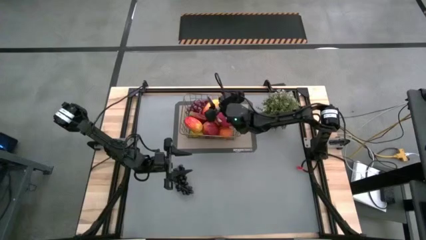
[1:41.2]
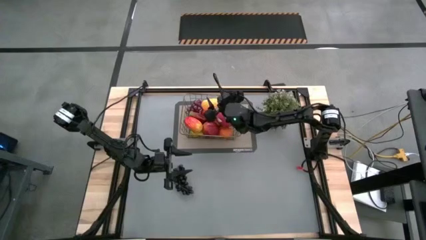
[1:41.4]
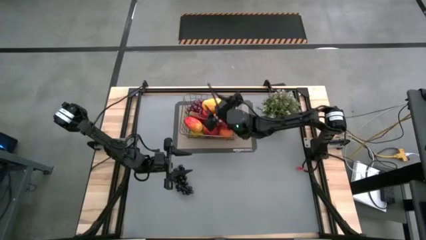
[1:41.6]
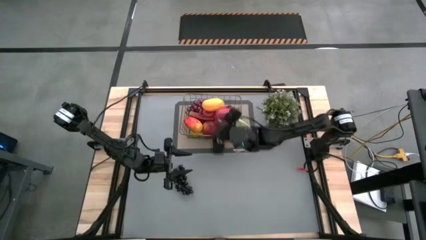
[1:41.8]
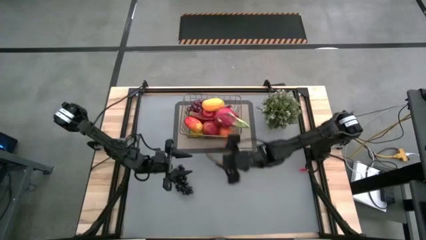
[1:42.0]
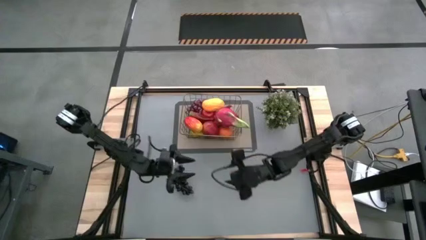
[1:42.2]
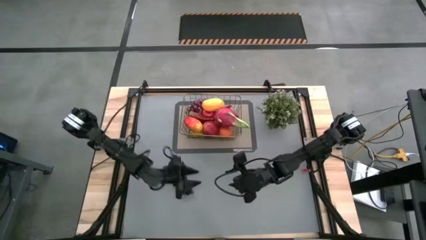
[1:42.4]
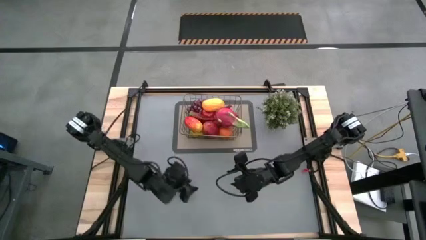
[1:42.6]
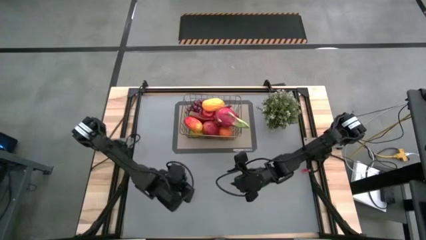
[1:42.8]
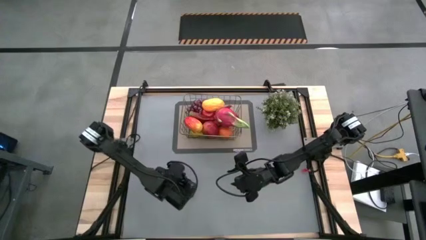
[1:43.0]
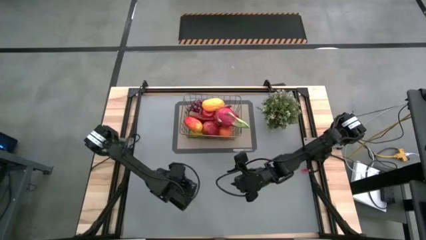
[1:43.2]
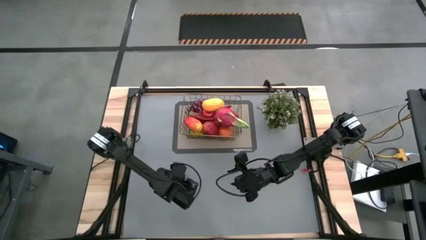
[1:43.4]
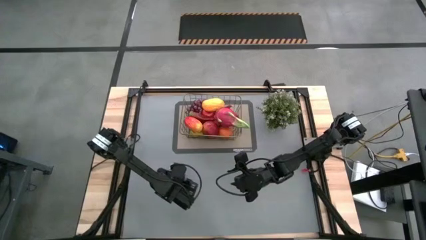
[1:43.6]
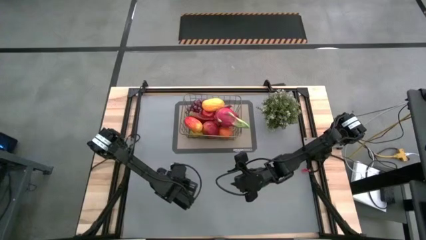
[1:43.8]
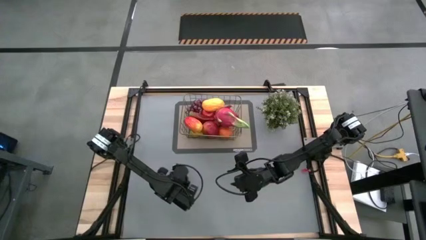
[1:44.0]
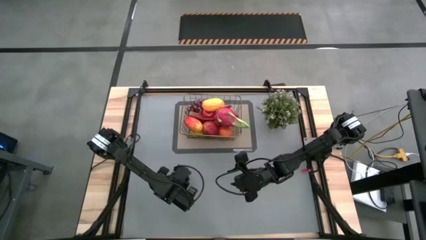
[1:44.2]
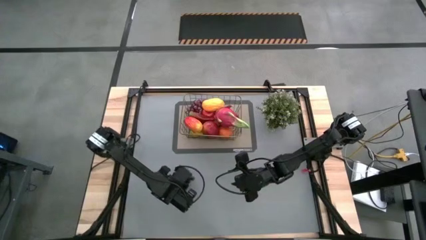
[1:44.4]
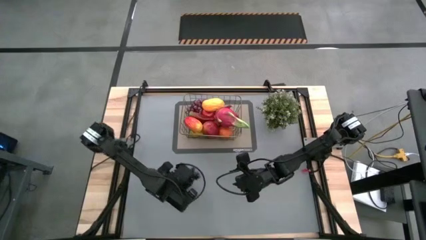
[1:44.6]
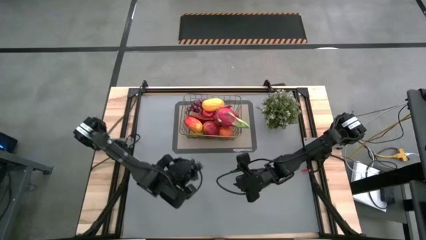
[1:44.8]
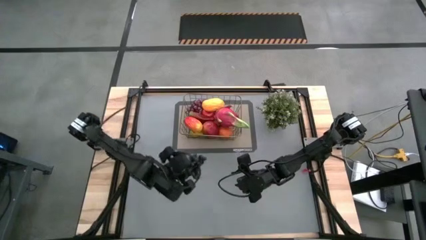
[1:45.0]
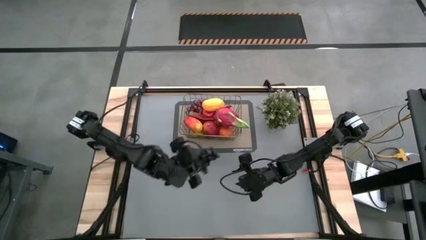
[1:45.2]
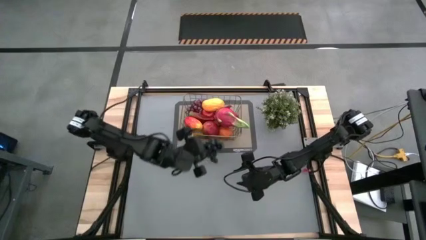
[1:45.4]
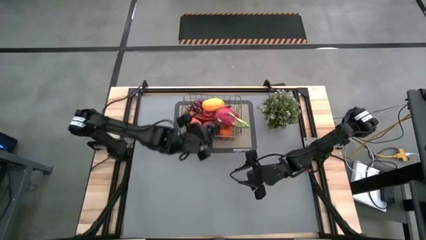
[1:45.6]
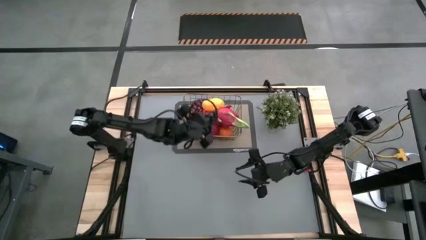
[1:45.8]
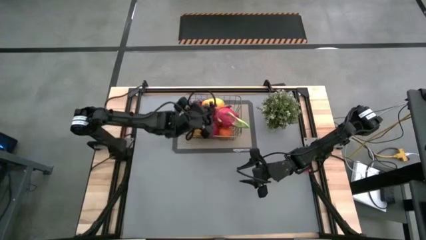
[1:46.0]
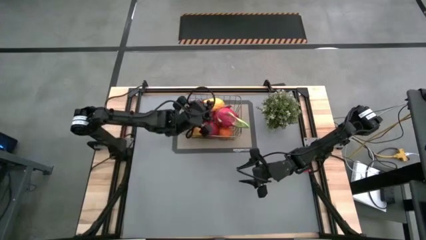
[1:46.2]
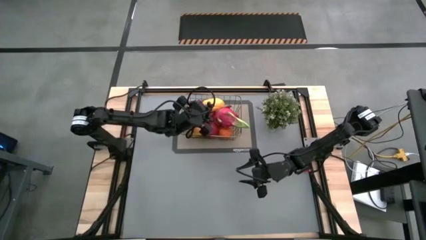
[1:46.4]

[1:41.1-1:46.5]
Task: Build produce basket
Put the black grapes into the wire basket

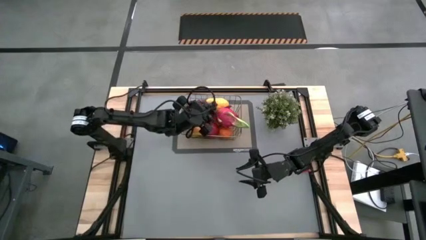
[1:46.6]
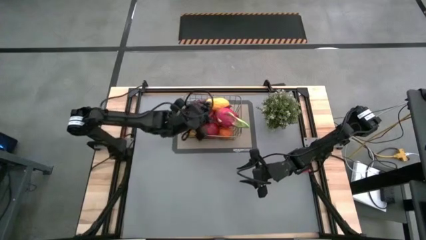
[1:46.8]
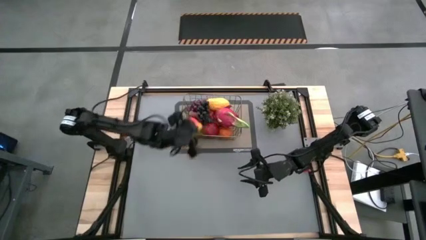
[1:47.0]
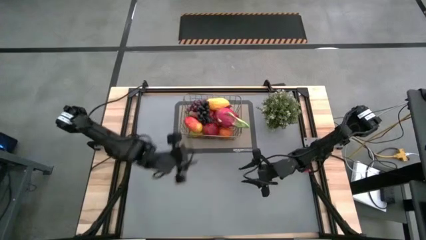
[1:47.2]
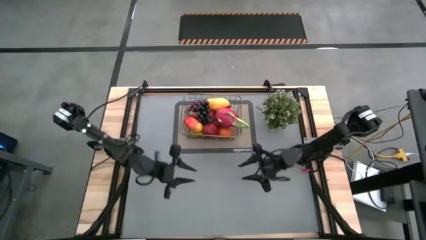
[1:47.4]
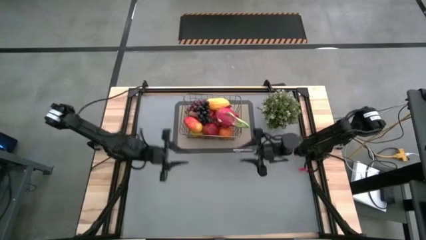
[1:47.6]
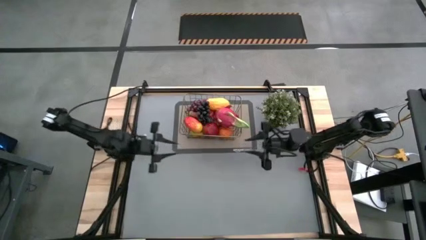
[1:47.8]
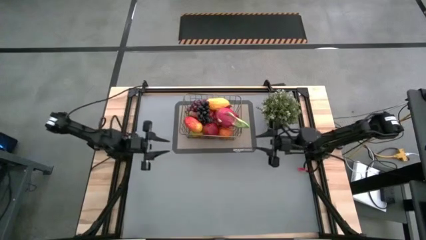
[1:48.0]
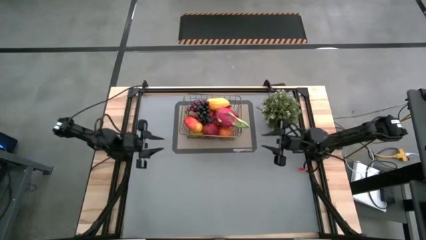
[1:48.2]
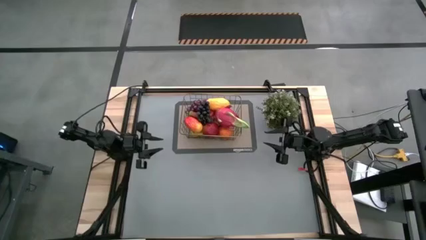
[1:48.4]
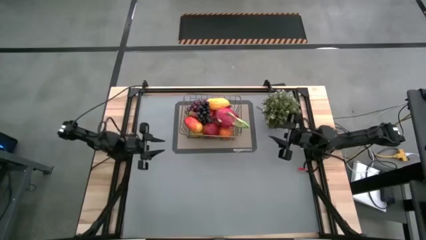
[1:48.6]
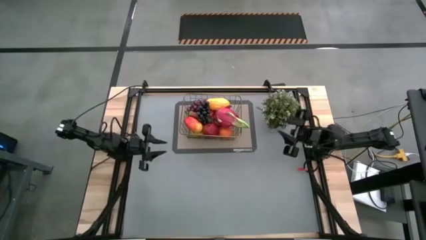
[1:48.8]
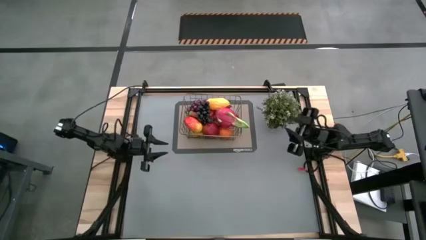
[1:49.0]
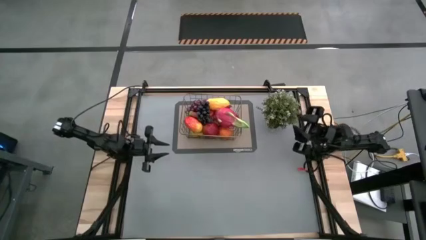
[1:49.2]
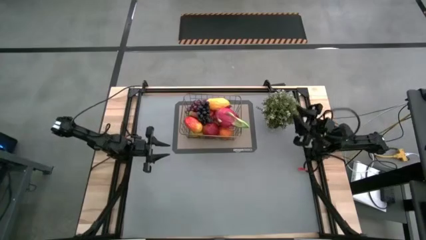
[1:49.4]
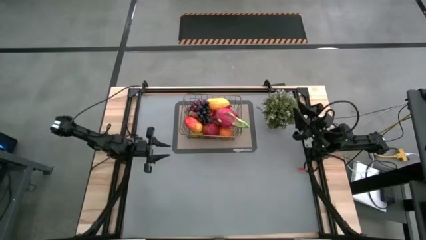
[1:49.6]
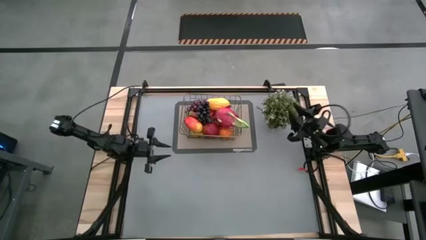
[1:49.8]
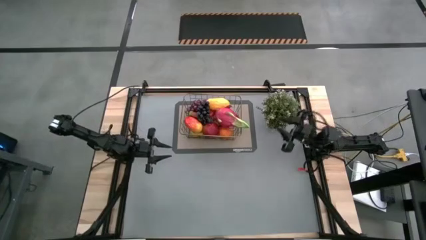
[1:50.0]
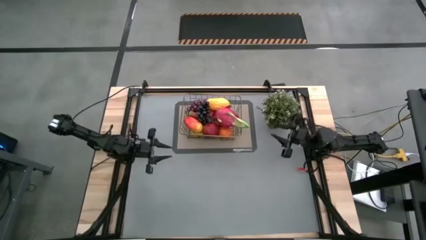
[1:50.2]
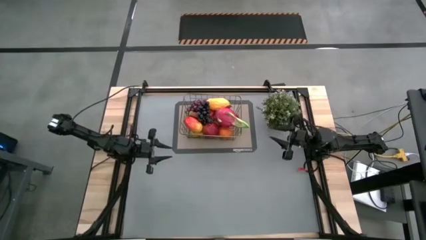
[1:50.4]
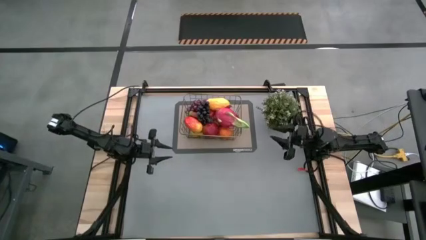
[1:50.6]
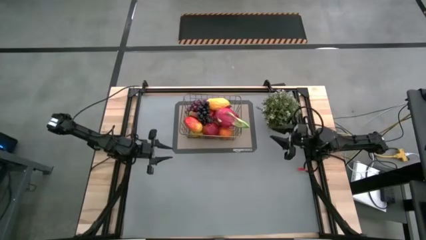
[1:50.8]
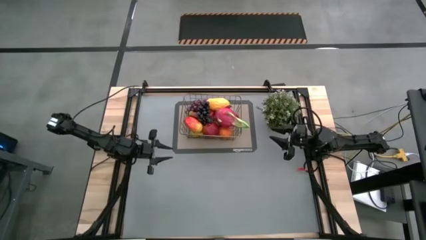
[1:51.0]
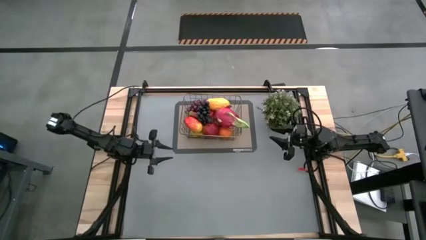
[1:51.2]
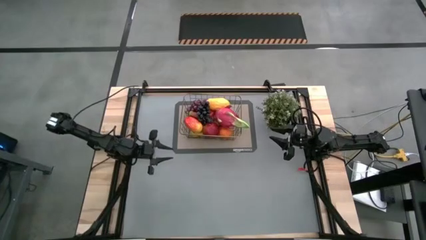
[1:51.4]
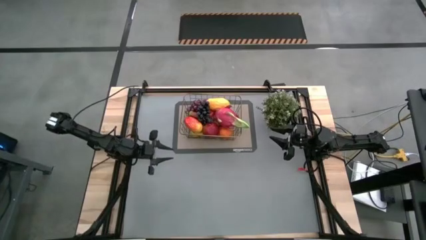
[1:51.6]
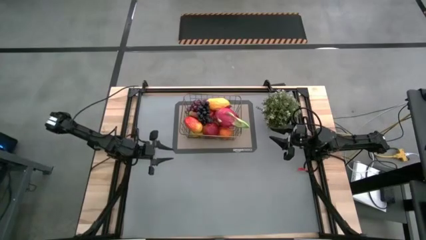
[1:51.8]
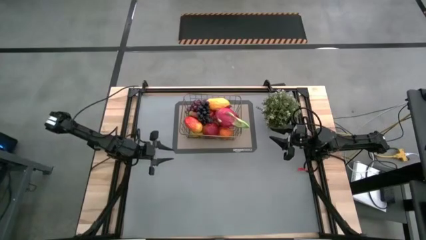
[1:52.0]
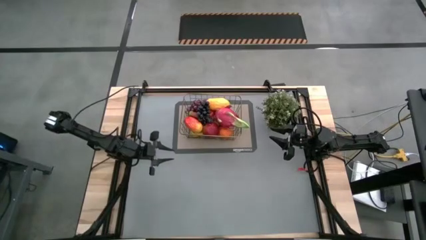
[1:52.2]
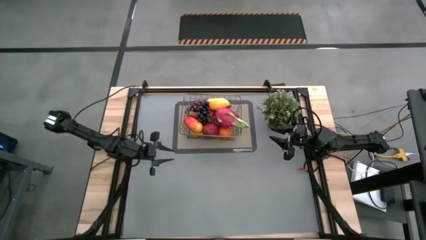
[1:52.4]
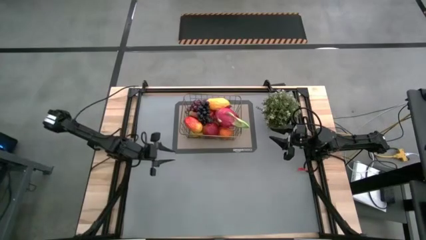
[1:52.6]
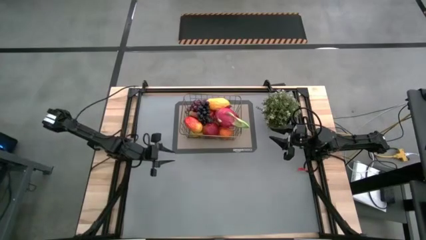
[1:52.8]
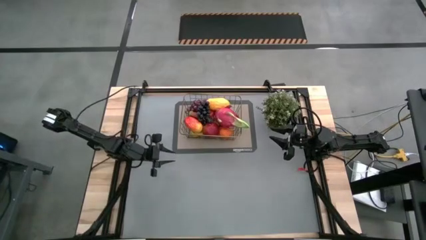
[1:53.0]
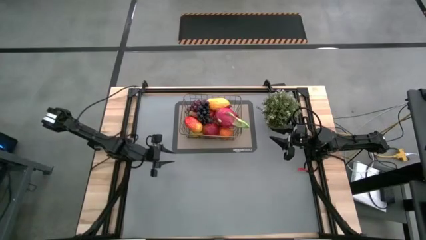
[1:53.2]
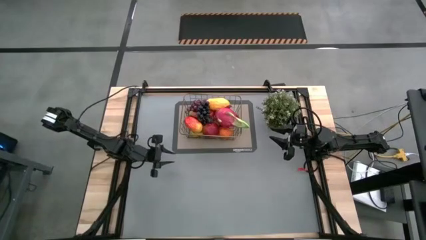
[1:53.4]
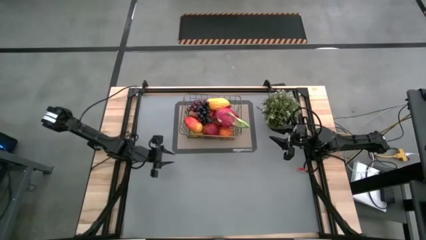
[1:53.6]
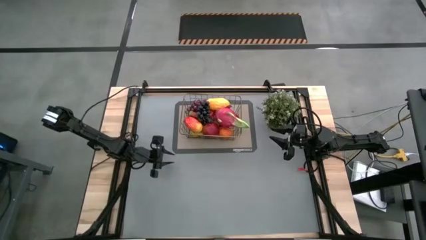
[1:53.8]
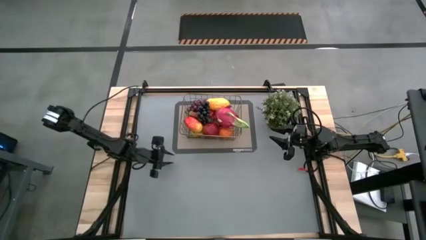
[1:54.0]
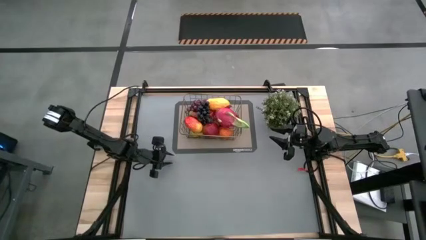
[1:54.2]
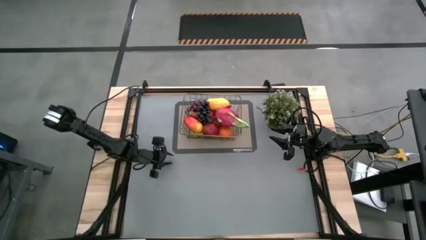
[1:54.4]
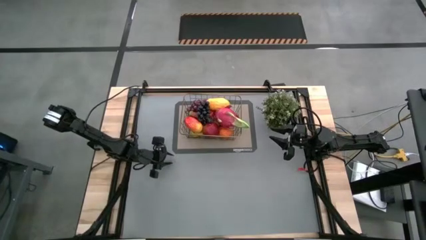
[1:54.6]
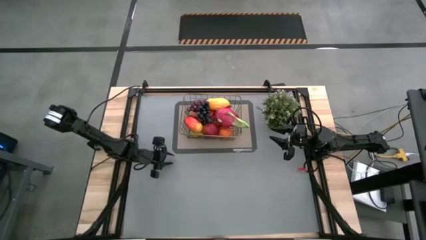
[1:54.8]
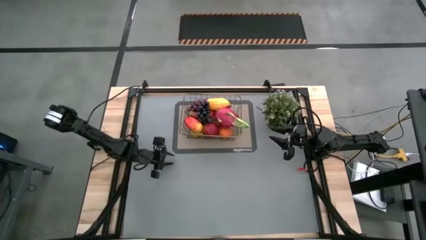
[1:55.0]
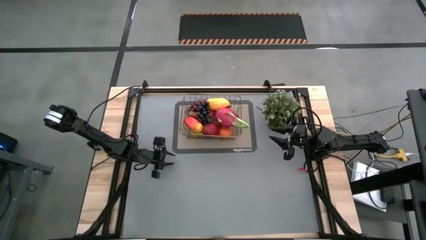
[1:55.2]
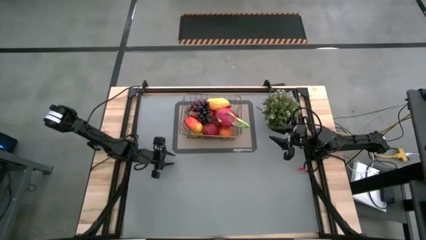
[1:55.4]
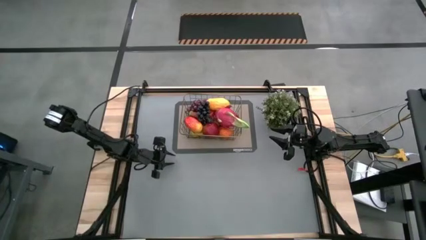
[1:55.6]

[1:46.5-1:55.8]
Return to Home Position
